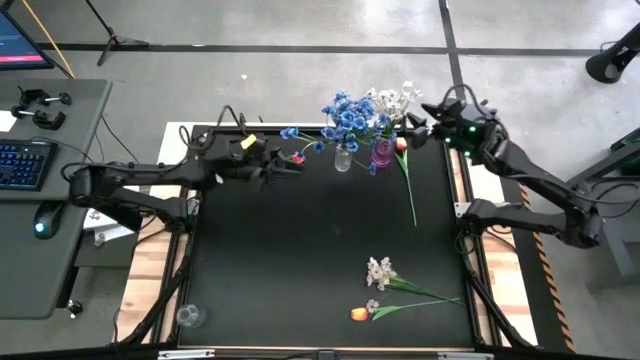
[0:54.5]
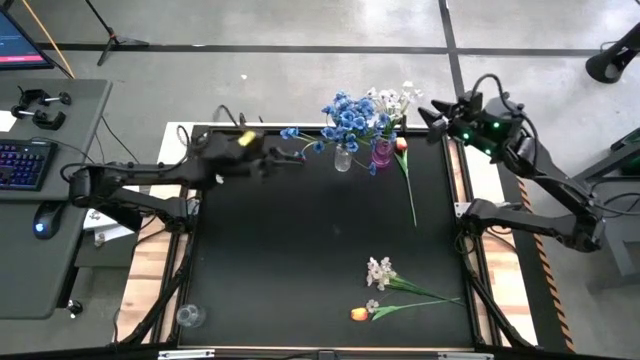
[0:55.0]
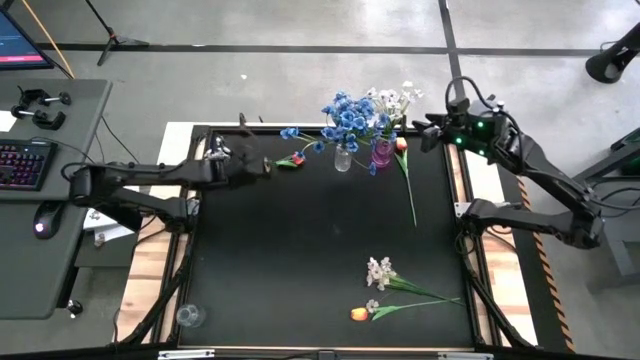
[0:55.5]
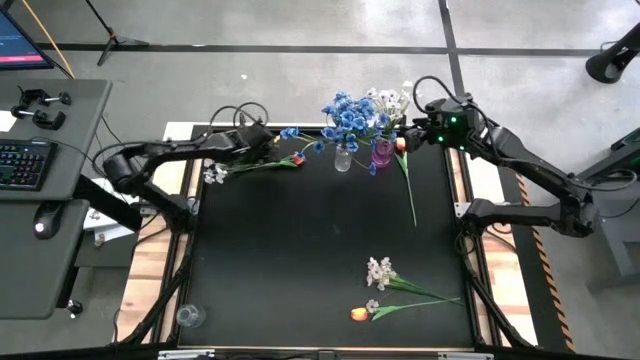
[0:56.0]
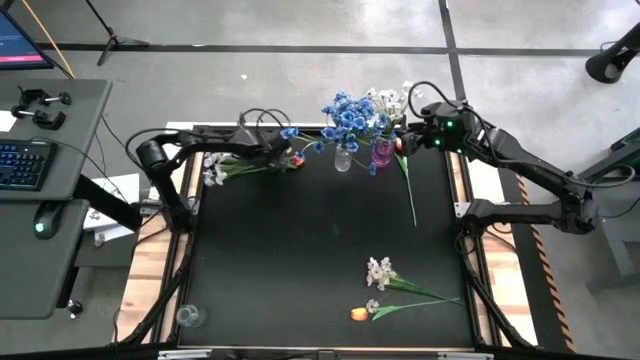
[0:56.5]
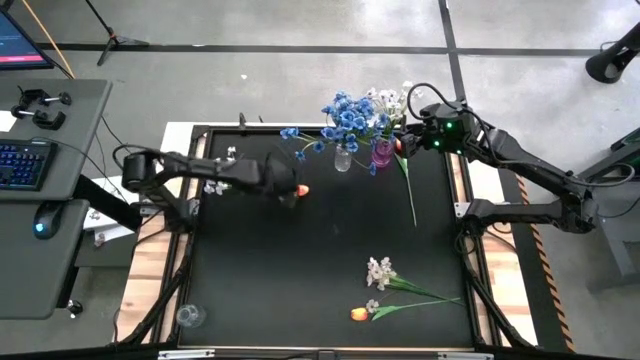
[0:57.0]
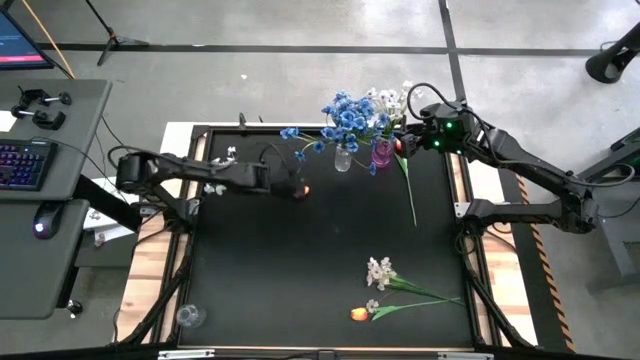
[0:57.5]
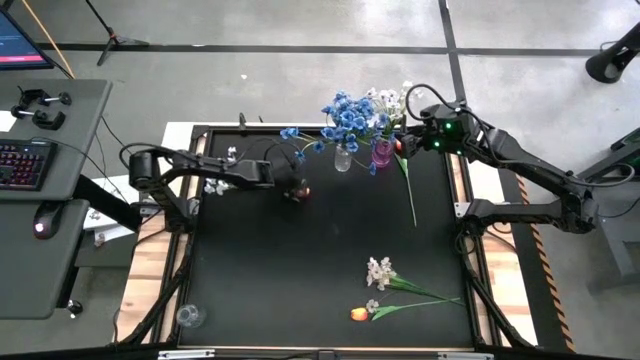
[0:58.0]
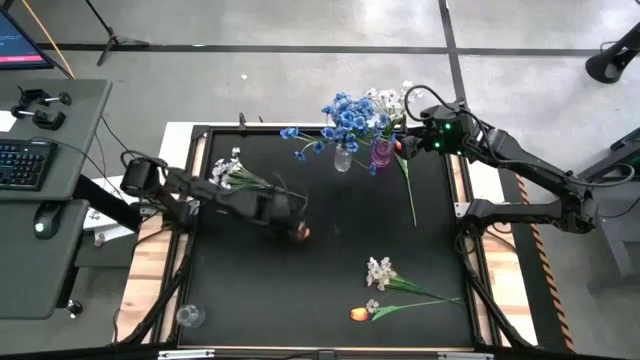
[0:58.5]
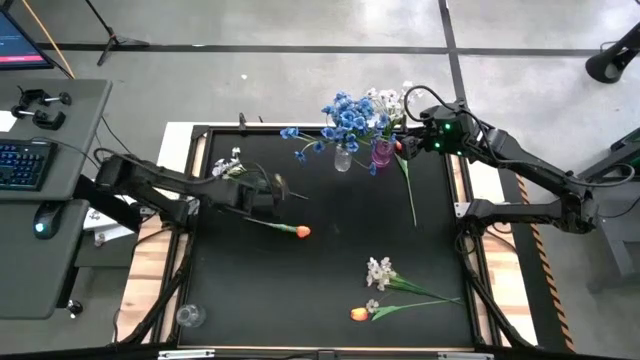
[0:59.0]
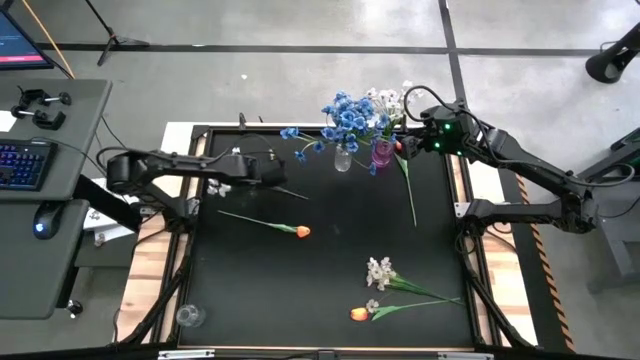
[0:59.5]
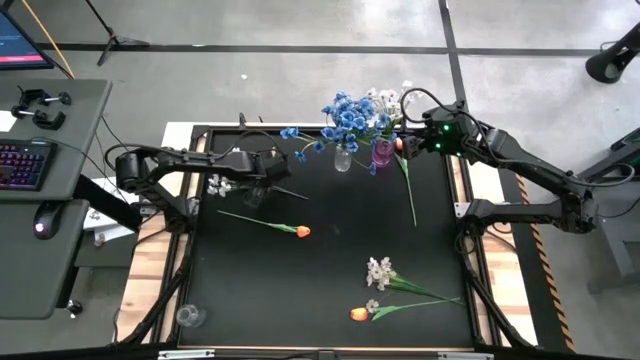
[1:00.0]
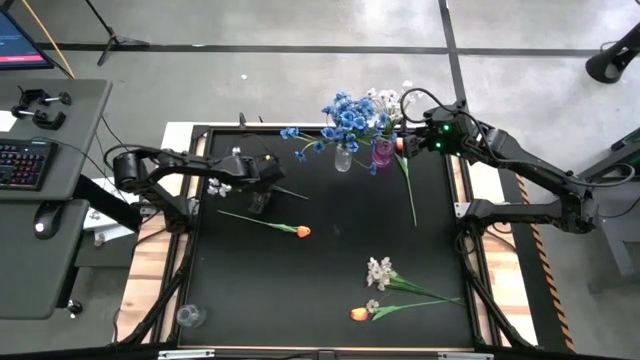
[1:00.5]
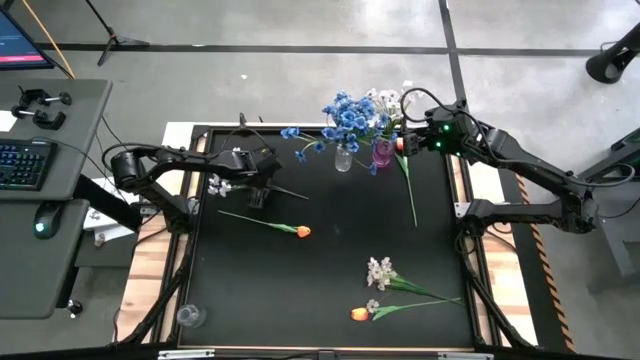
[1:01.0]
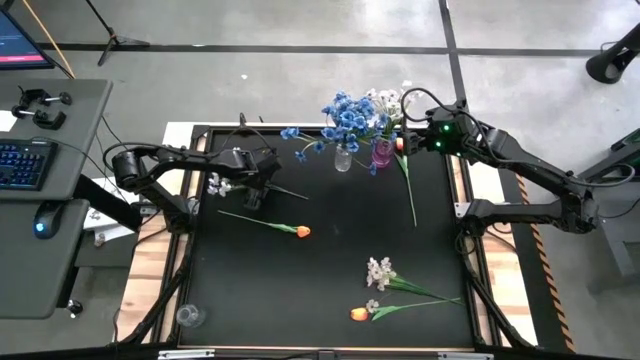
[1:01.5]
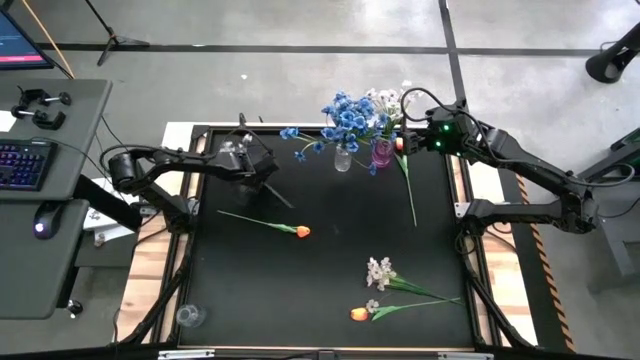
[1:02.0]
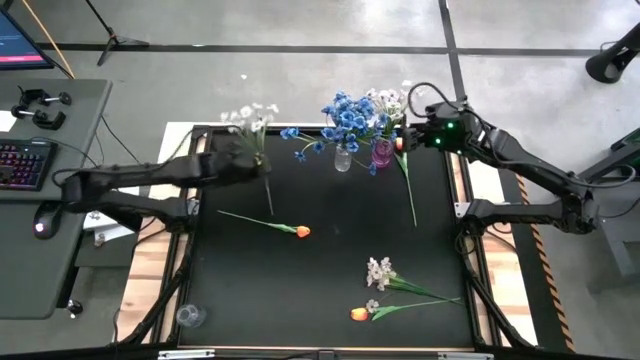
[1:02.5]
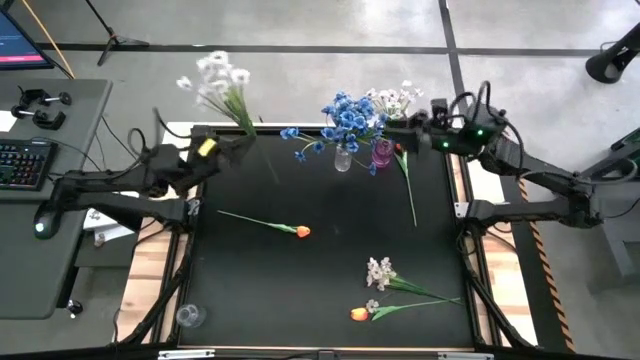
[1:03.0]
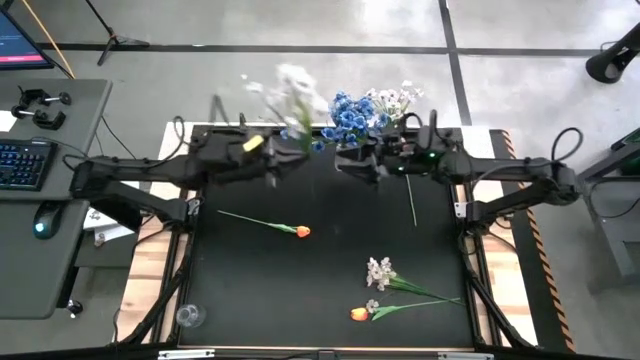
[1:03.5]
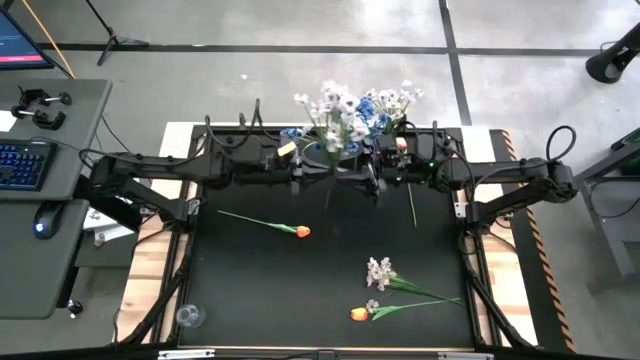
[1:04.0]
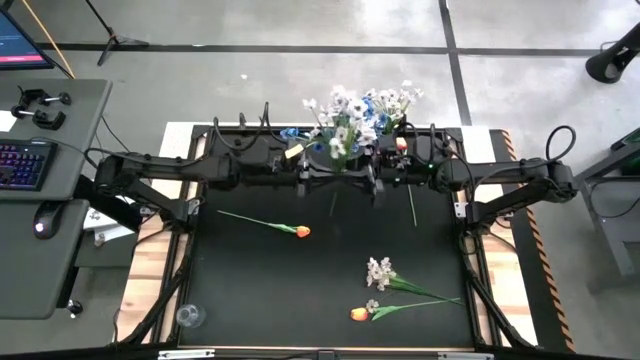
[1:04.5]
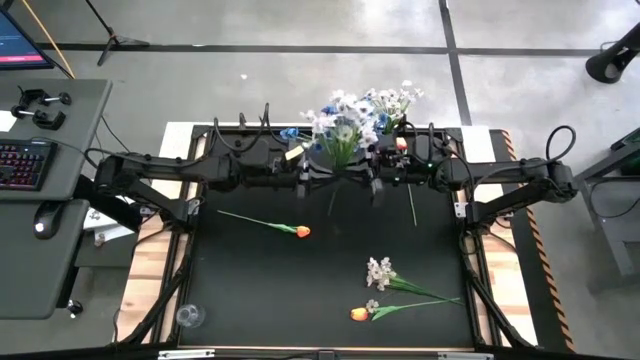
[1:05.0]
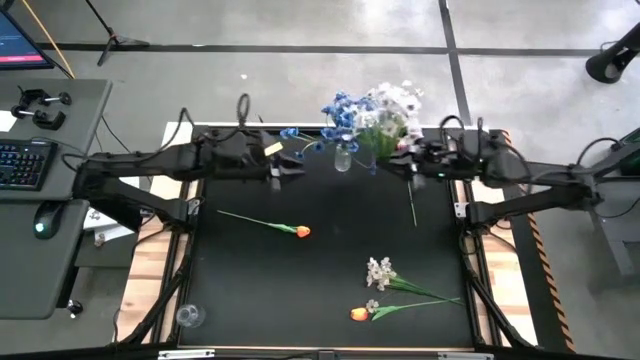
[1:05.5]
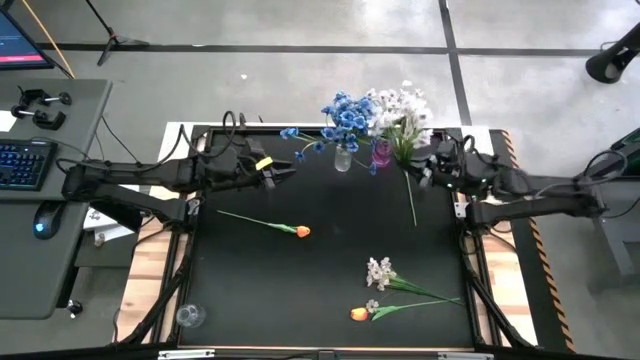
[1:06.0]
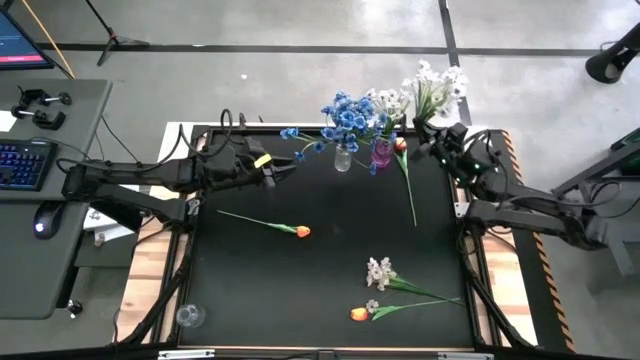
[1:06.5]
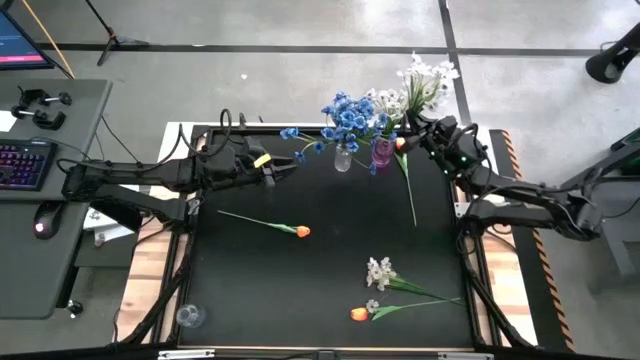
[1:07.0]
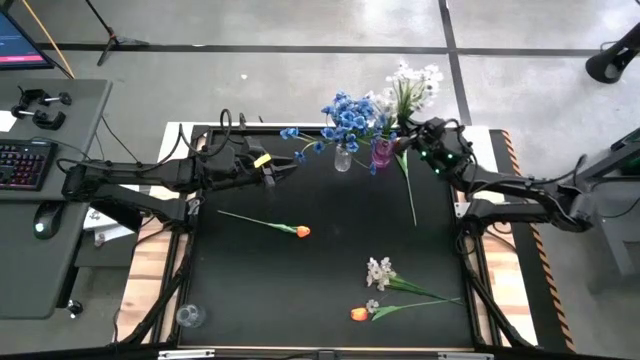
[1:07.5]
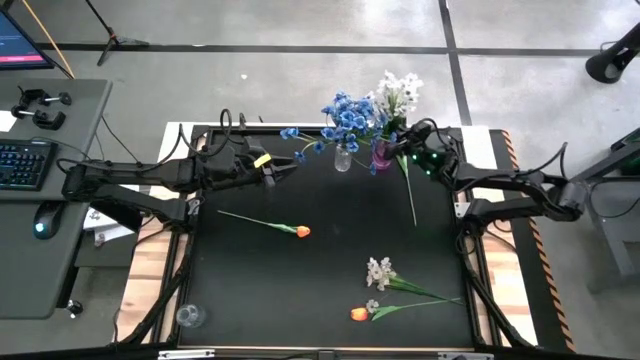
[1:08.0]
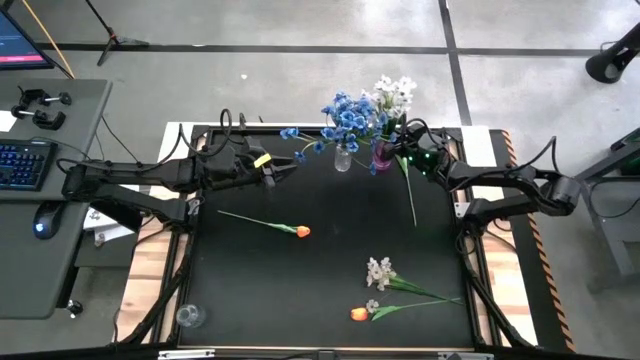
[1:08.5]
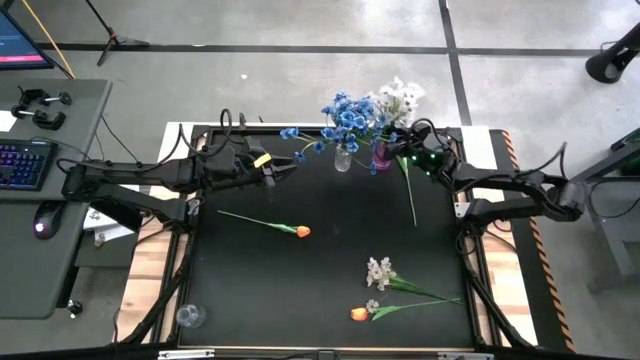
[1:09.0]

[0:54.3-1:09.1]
Task: Sort flowers into vase by color
Put the top white flowers into the purple vase
